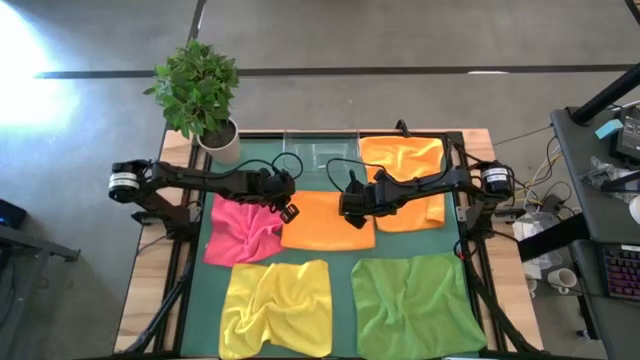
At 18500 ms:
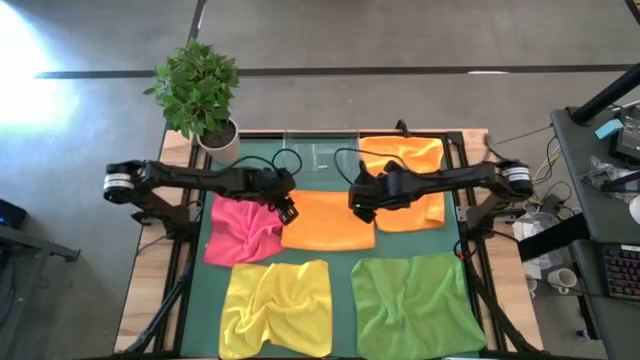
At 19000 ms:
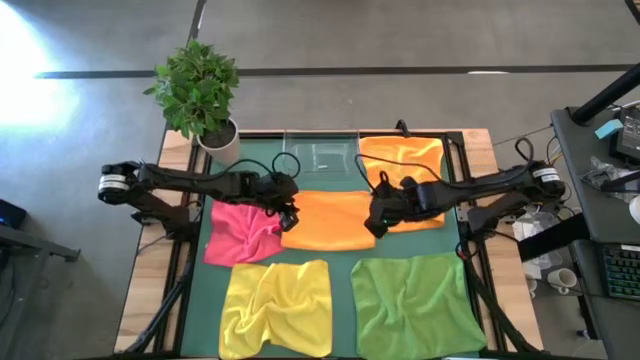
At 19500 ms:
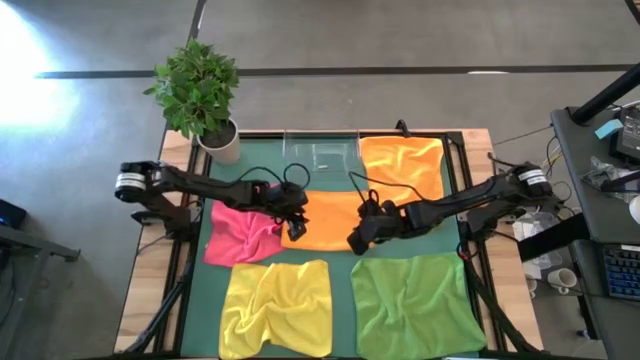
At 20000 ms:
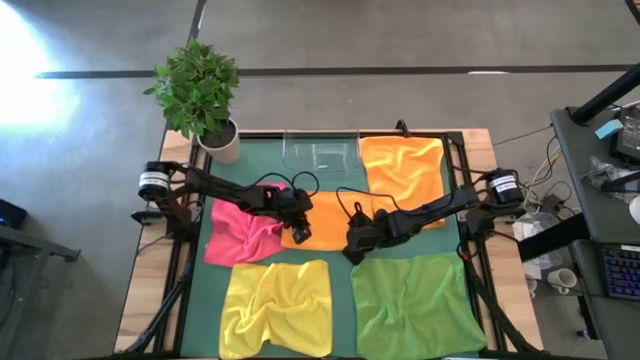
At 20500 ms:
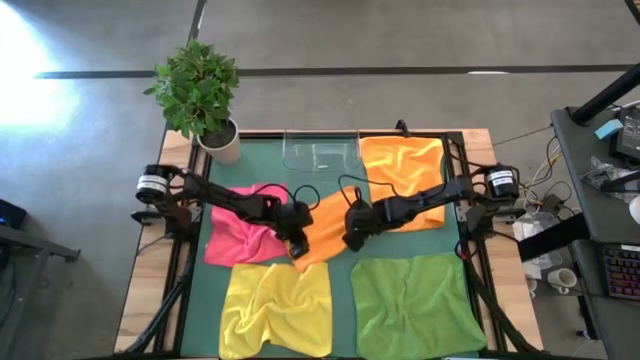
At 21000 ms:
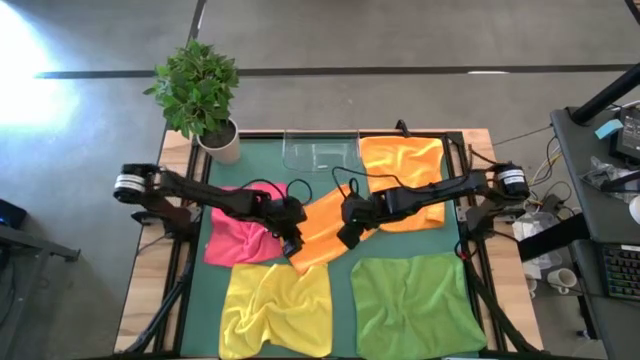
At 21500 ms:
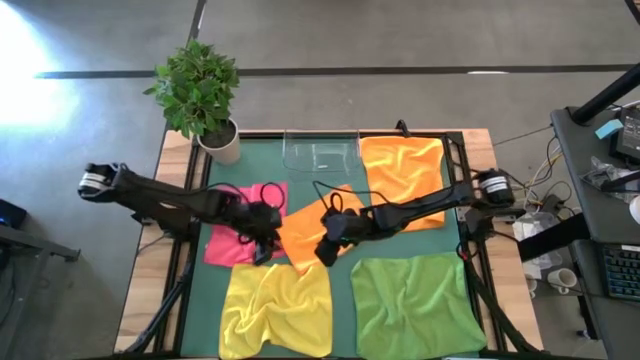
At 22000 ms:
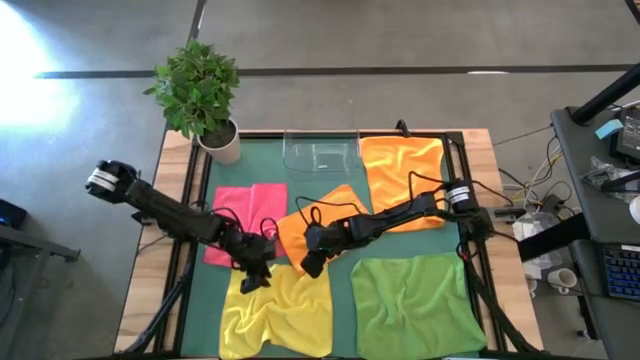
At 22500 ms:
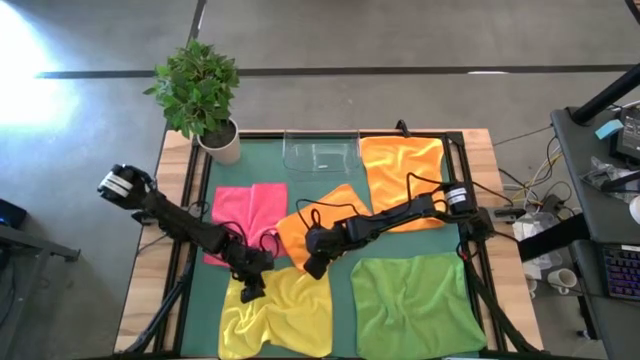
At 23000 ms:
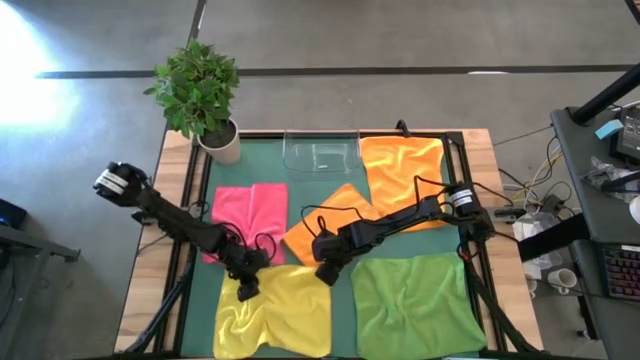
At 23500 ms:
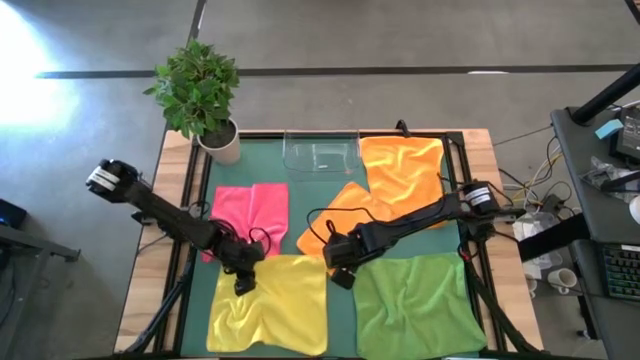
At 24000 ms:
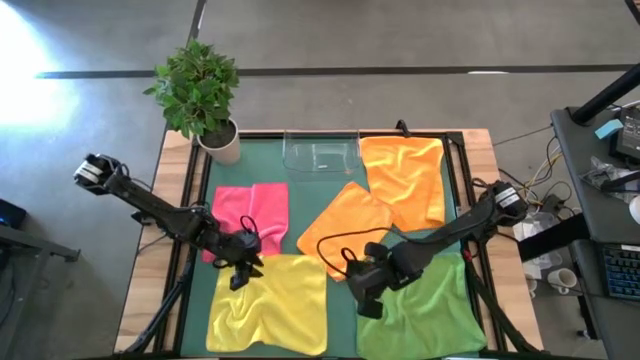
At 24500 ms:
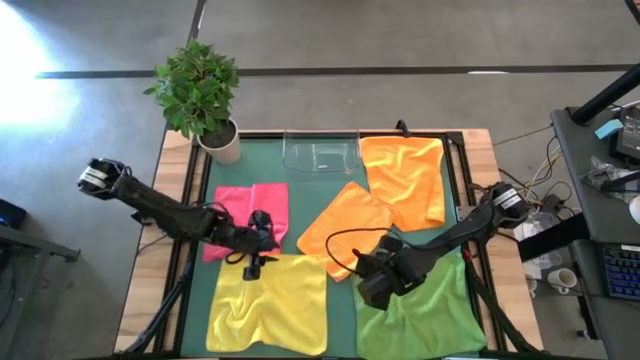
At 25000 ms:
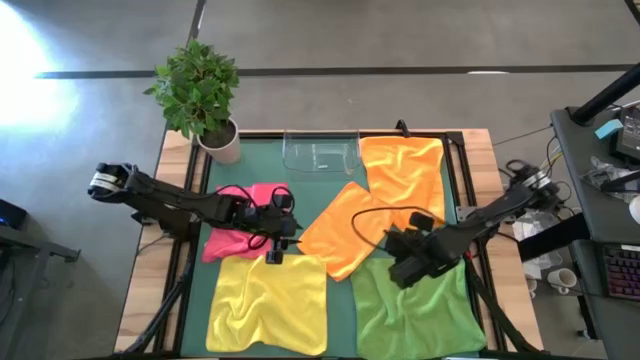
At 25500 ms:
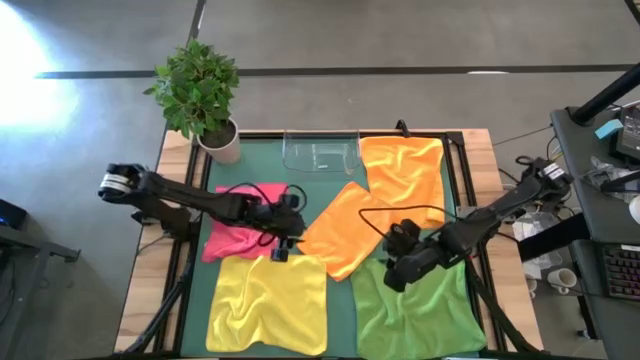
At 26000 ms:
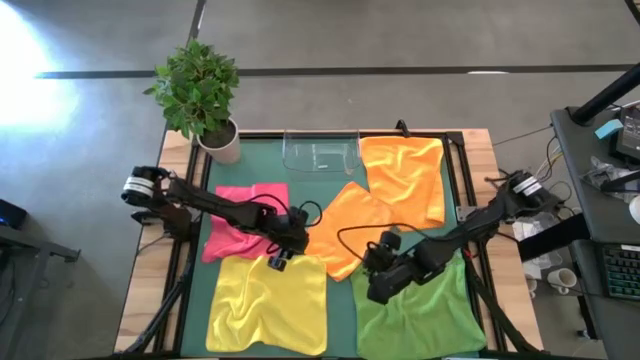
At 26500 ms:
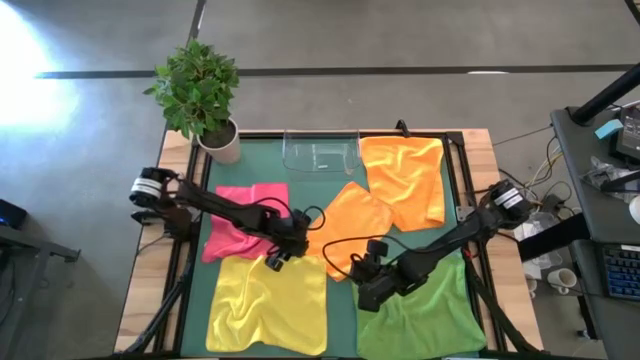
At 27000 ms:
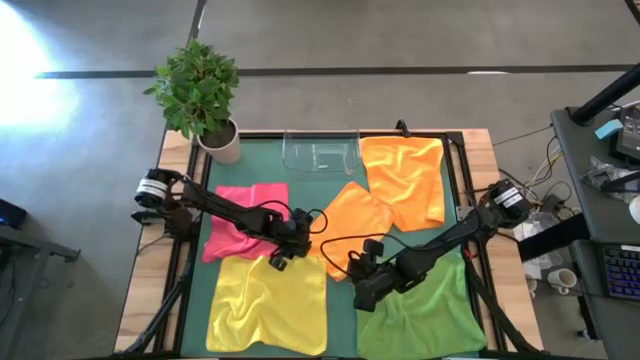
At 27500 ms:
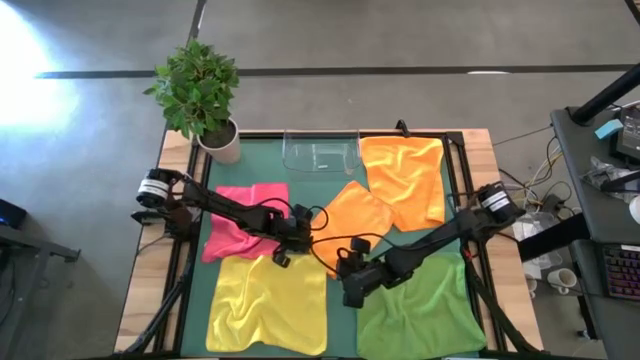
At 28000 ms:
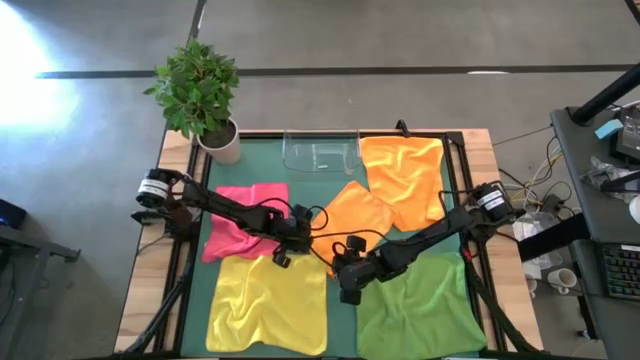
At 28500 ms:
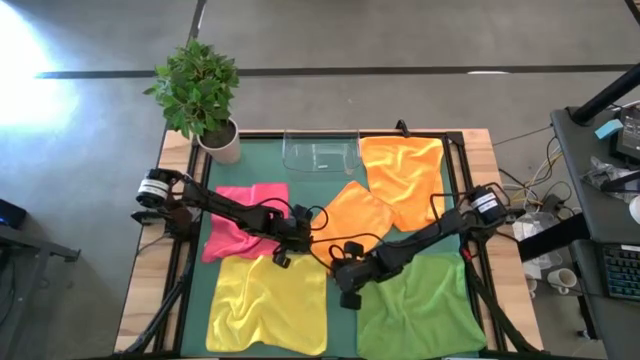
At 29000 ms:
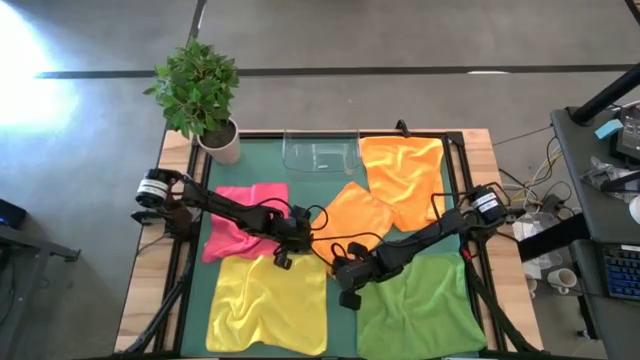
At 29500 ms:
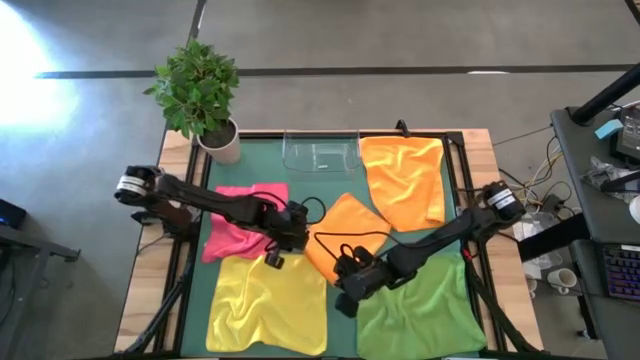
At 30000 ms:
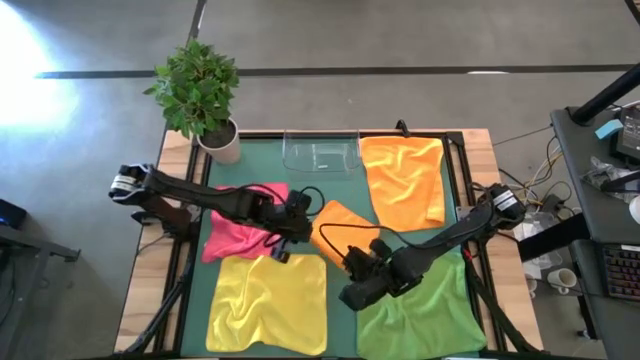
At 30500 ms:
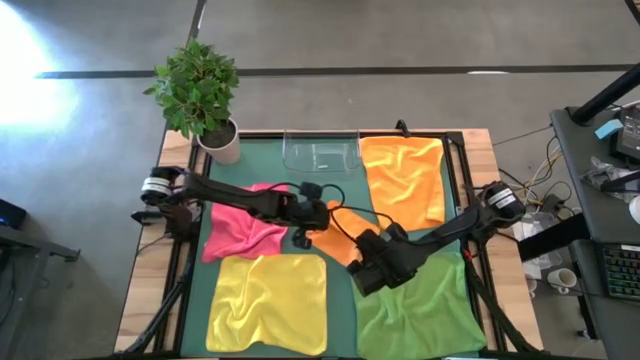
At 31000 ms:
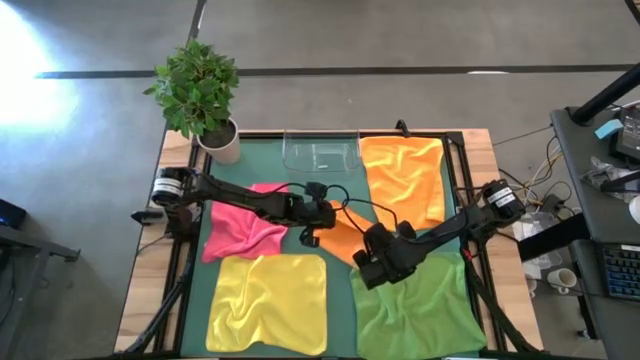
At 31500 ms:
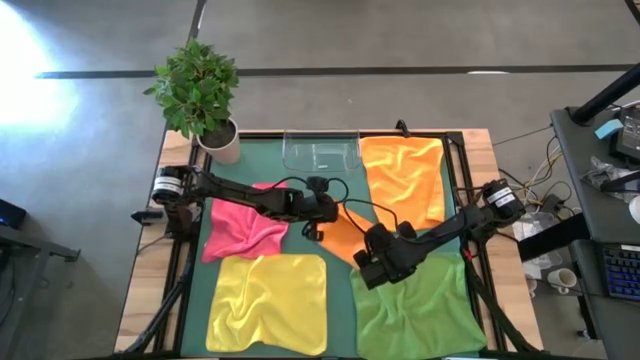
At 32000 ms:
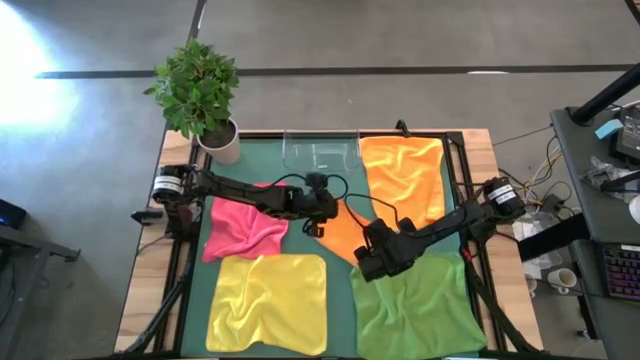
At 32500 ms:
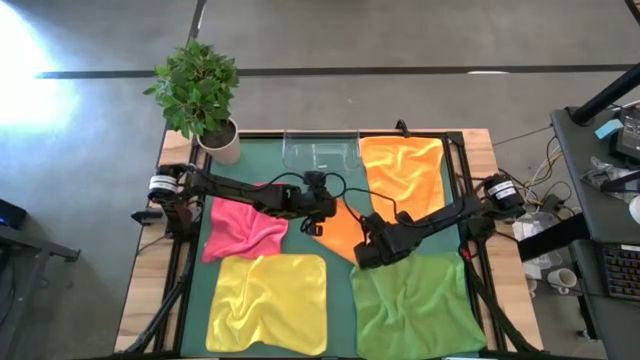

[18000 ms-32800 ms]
Task: Fold microfiber towels
Fold the left orange microfiber cloth

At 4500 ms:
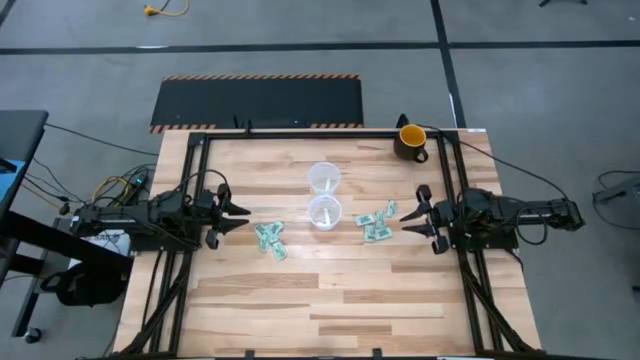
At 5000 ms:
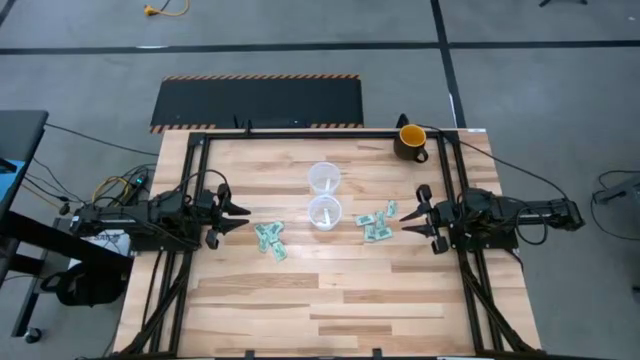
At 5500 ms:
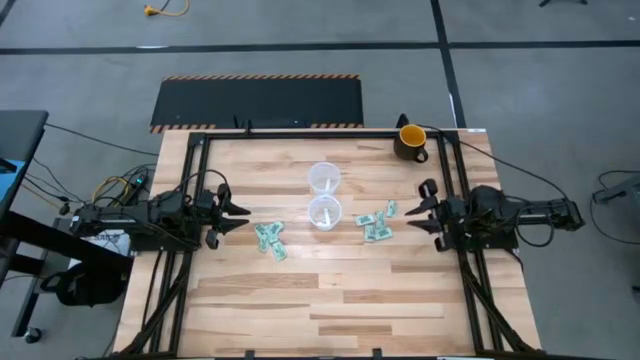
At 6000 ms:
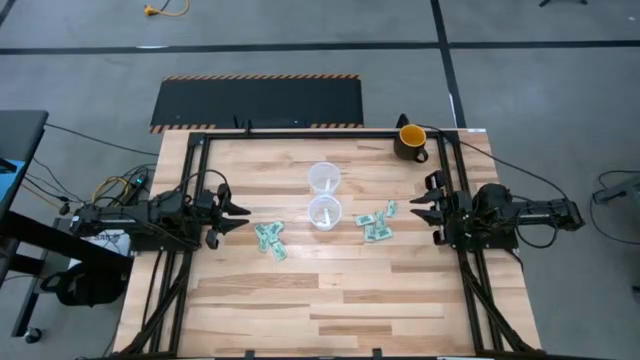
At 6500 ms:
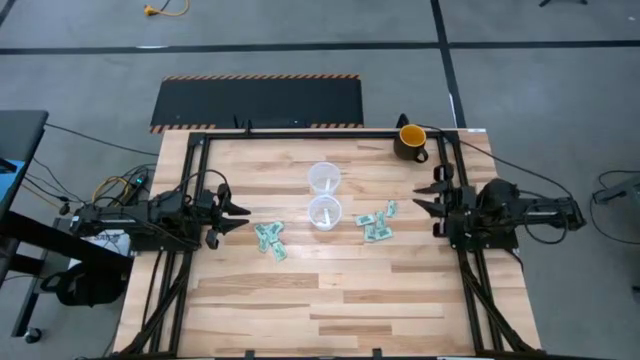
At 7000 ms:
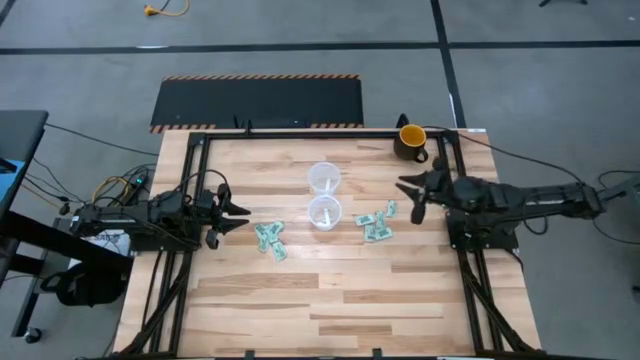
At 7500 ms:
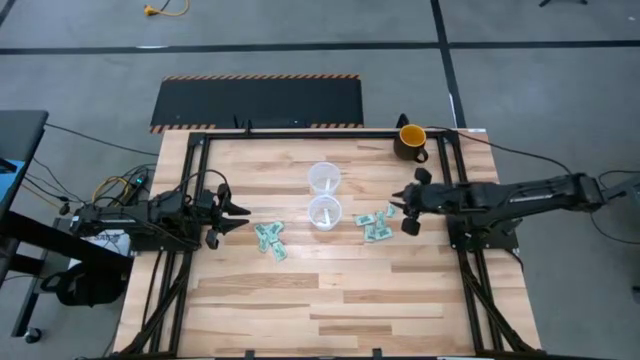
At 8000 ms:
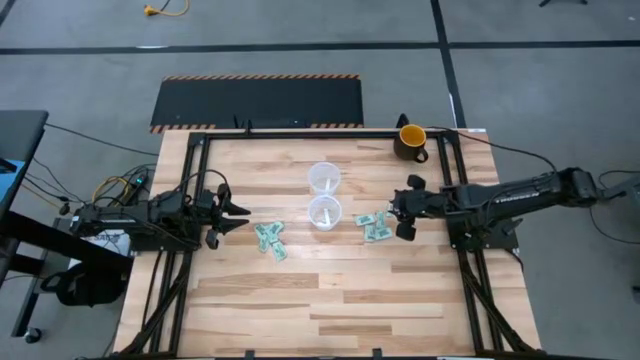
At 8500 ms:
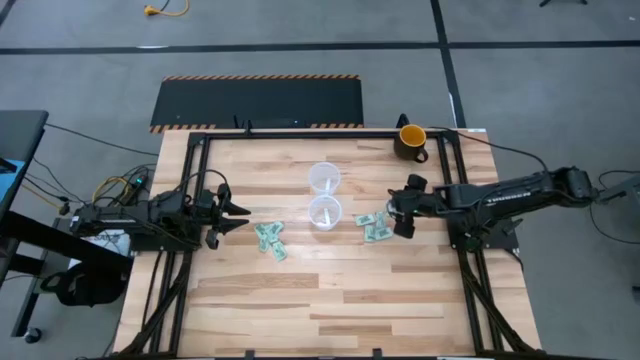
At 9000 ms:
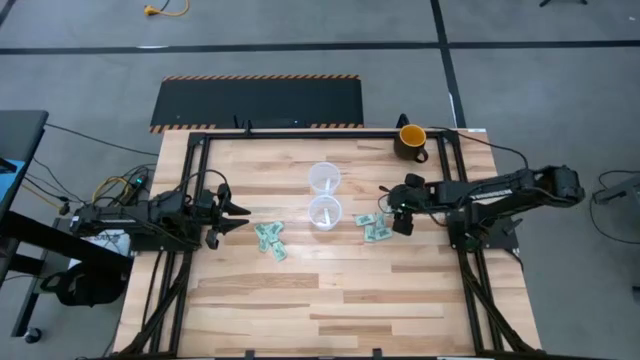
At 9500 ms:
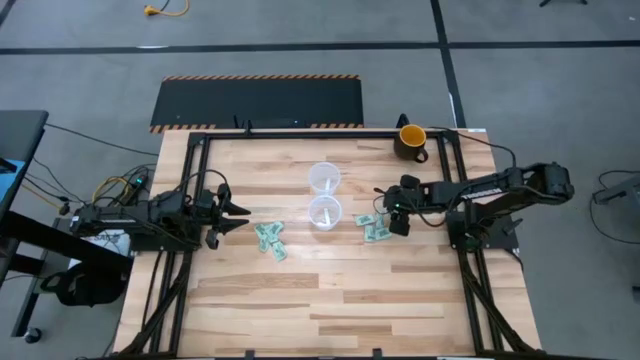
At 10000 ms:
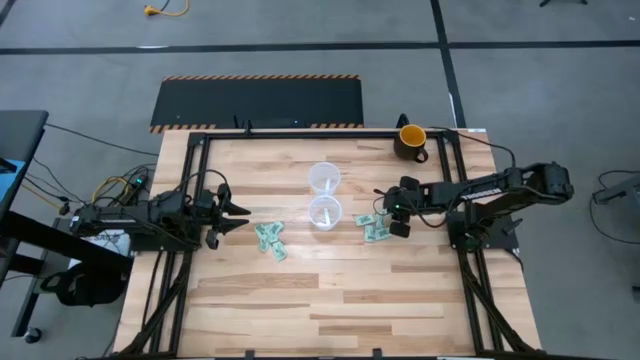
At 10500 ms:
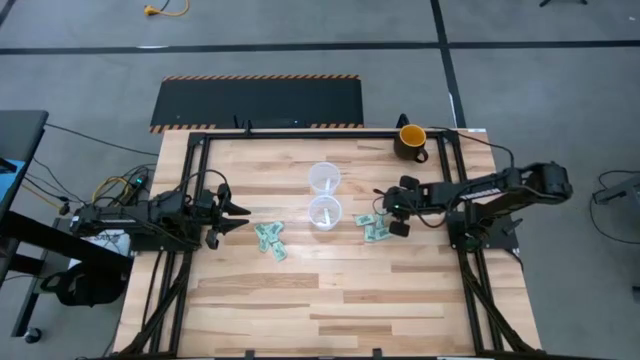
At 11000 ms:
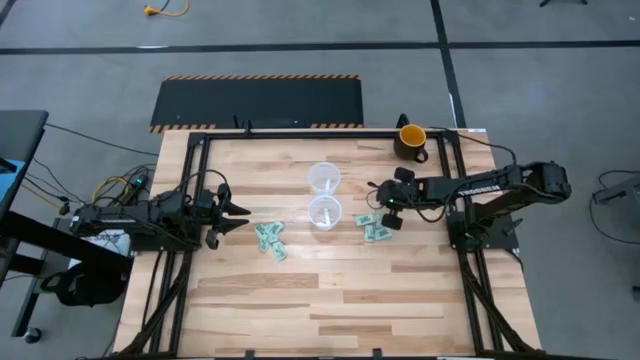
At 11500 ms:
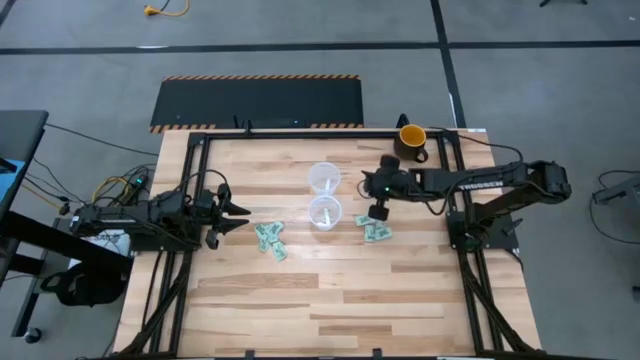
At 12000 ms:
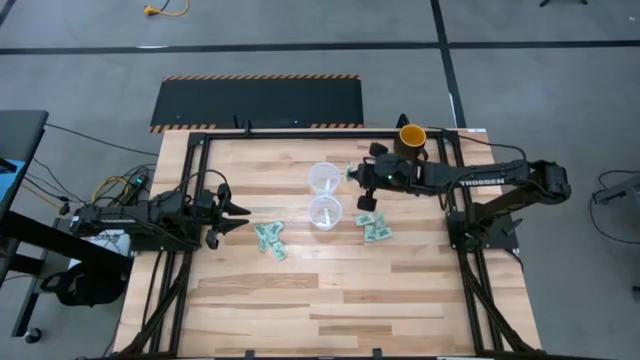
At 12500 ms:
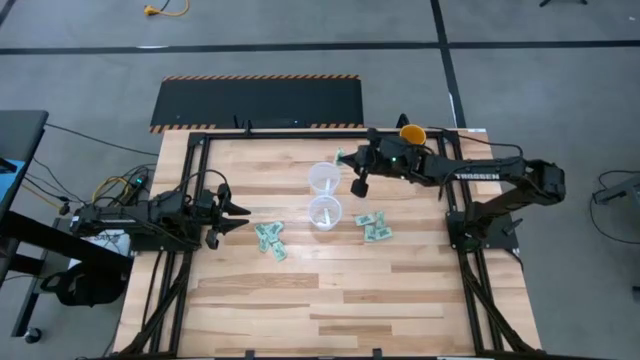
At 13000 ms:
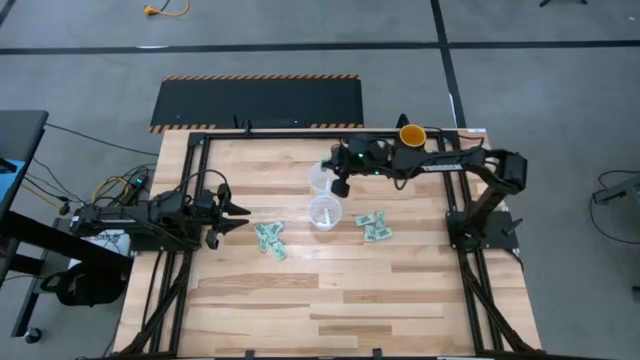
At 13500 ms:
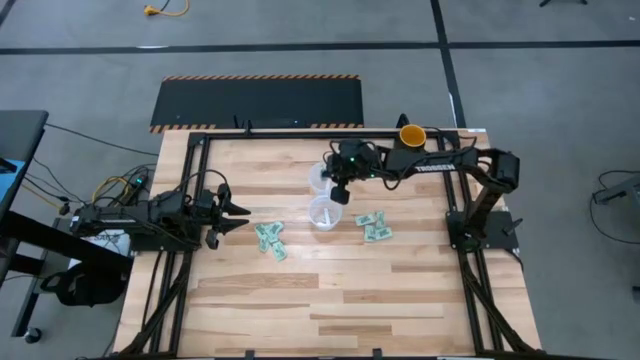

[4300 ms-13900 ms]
Task: Pick and place items into bin
Put the green stevia packet into the top transparent bin
